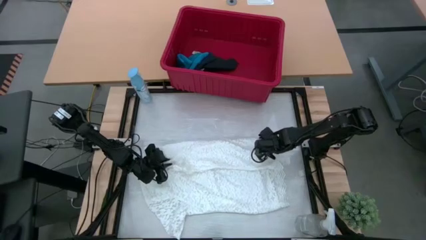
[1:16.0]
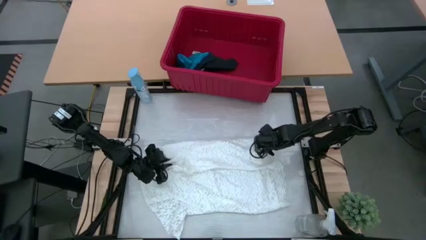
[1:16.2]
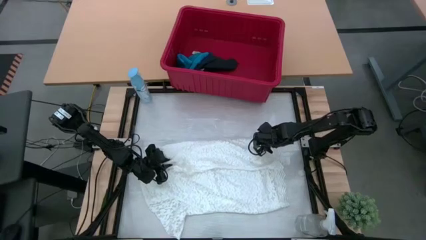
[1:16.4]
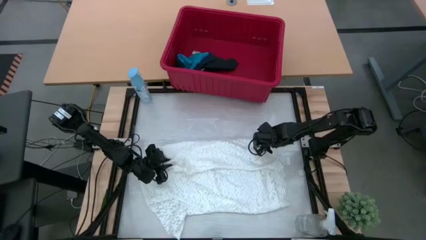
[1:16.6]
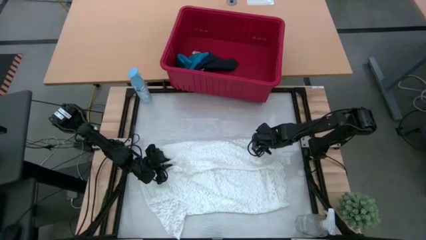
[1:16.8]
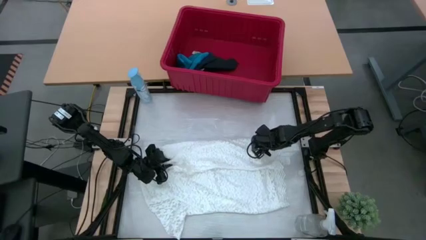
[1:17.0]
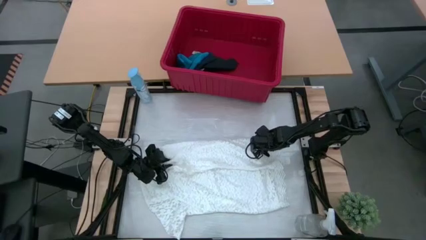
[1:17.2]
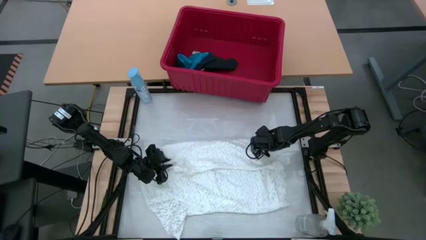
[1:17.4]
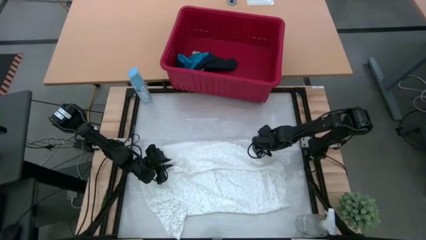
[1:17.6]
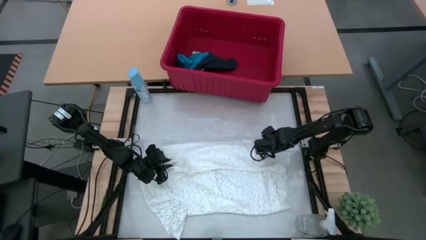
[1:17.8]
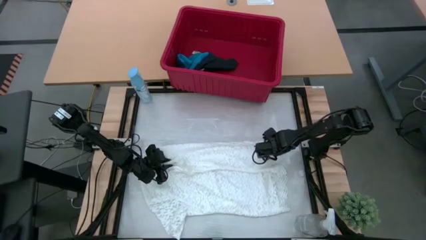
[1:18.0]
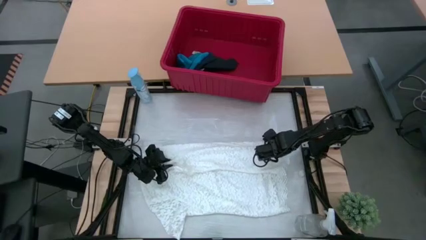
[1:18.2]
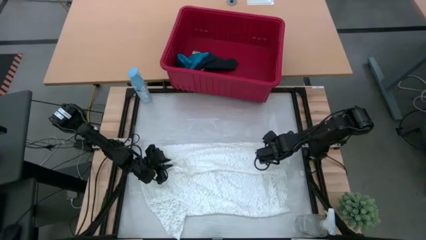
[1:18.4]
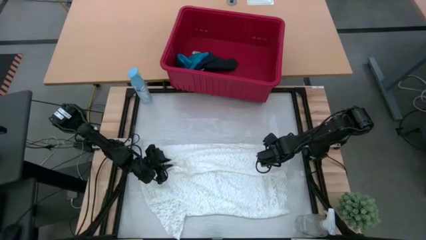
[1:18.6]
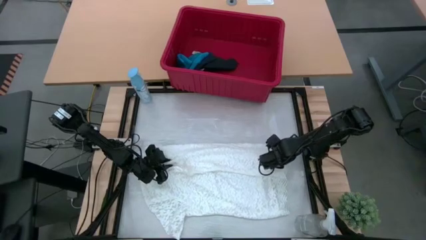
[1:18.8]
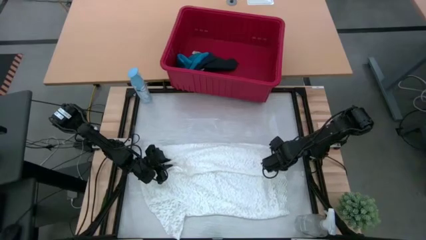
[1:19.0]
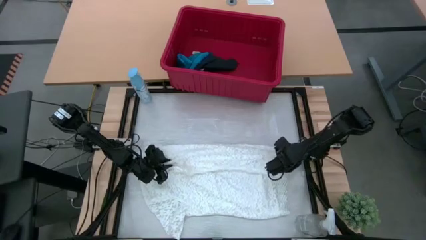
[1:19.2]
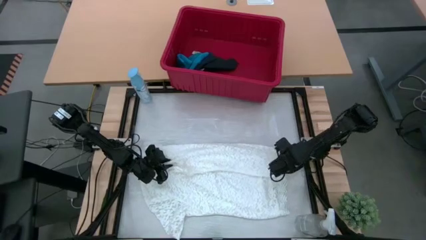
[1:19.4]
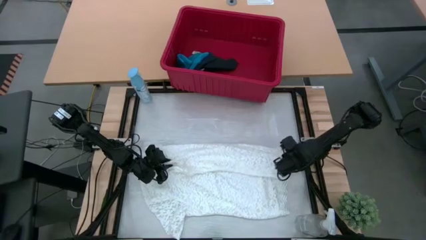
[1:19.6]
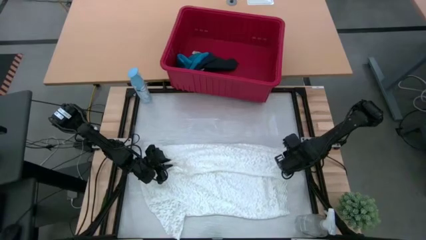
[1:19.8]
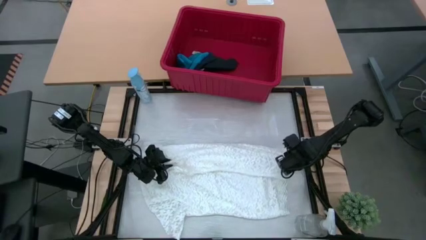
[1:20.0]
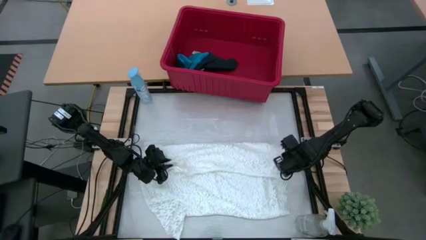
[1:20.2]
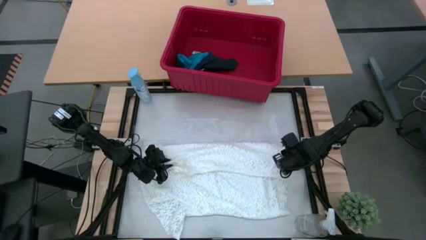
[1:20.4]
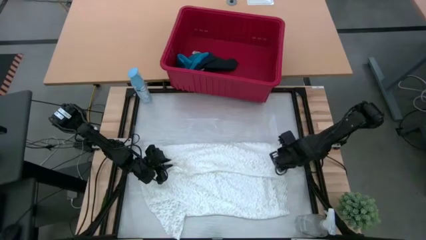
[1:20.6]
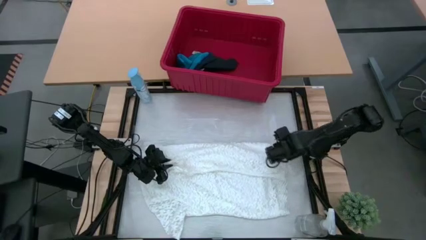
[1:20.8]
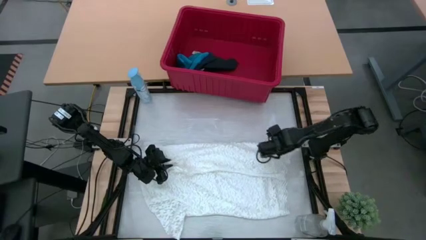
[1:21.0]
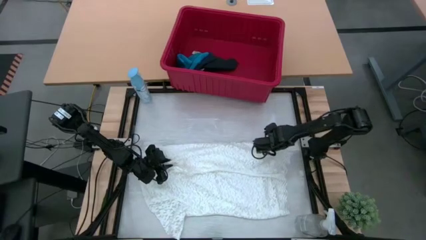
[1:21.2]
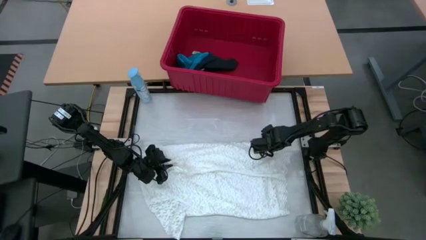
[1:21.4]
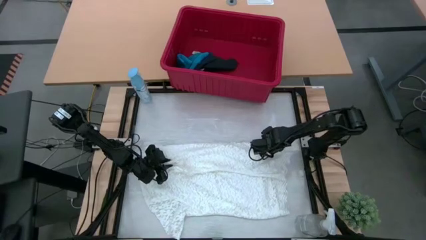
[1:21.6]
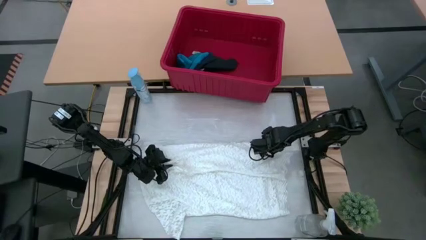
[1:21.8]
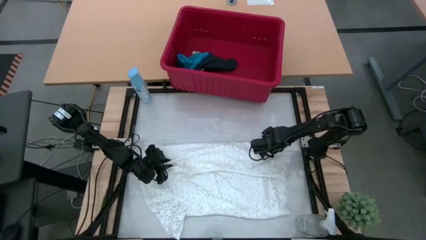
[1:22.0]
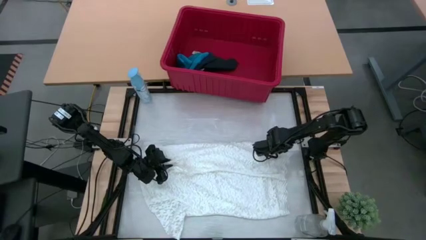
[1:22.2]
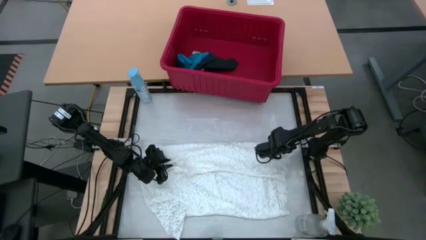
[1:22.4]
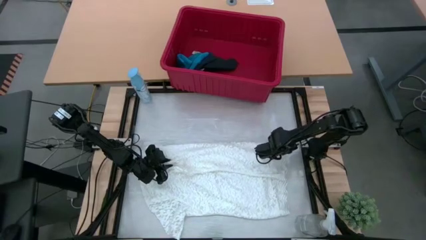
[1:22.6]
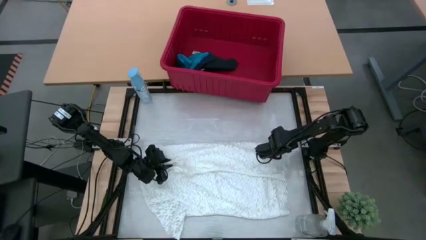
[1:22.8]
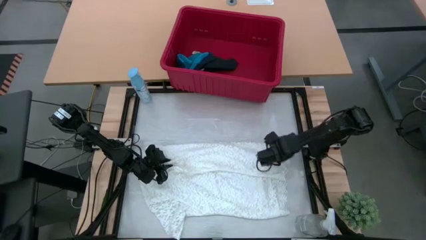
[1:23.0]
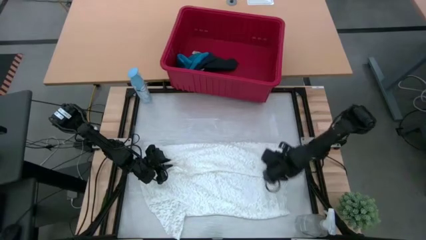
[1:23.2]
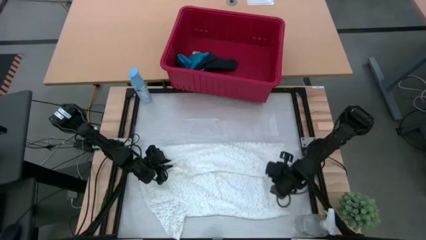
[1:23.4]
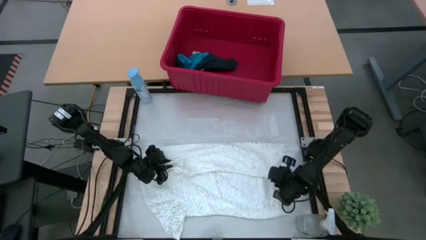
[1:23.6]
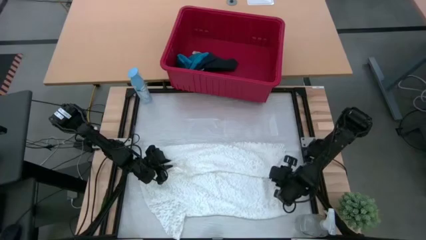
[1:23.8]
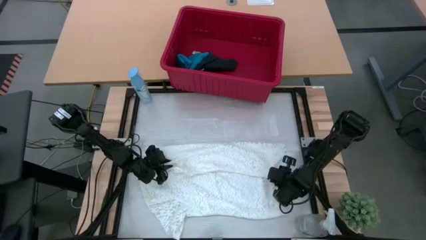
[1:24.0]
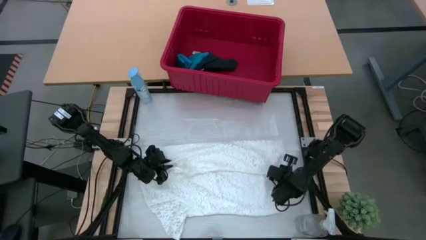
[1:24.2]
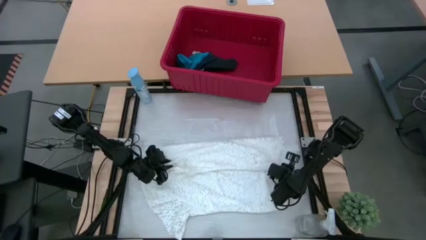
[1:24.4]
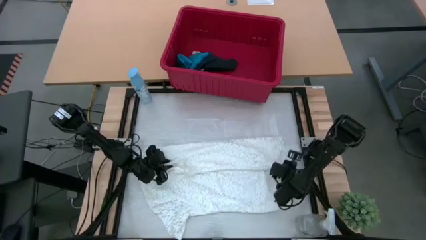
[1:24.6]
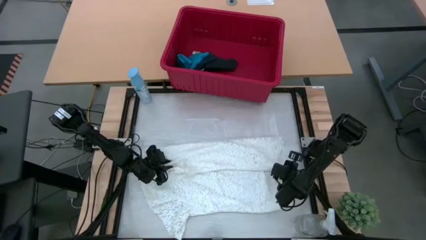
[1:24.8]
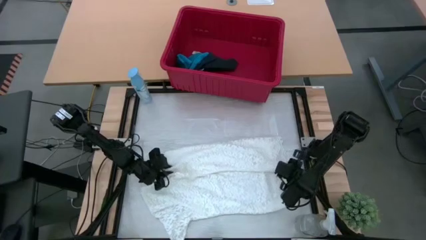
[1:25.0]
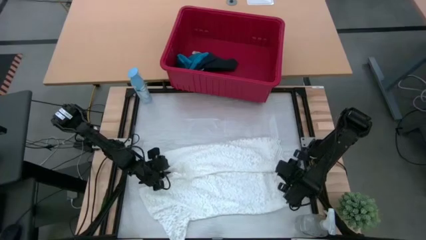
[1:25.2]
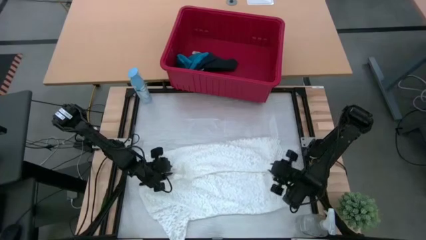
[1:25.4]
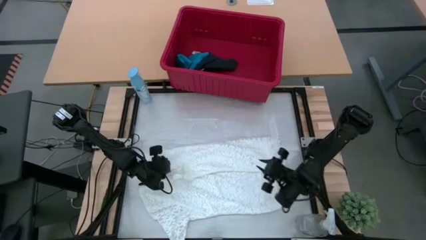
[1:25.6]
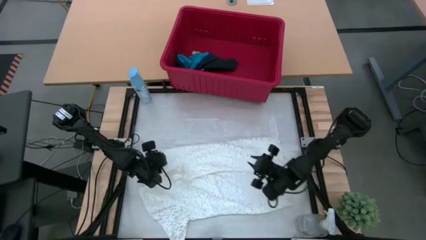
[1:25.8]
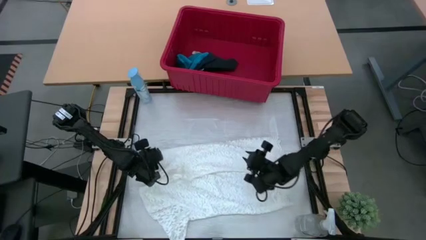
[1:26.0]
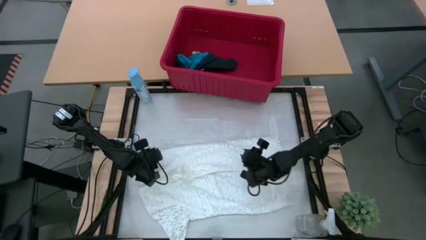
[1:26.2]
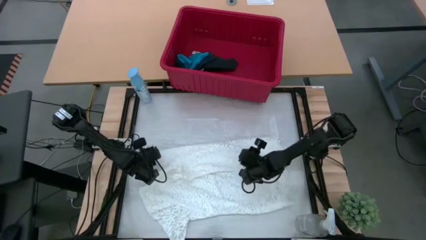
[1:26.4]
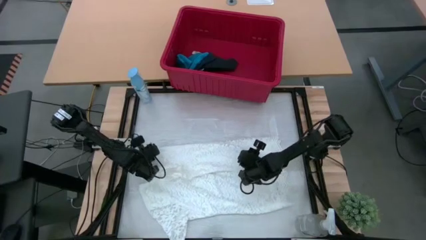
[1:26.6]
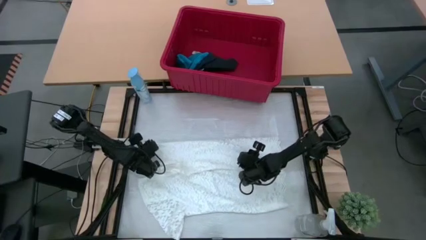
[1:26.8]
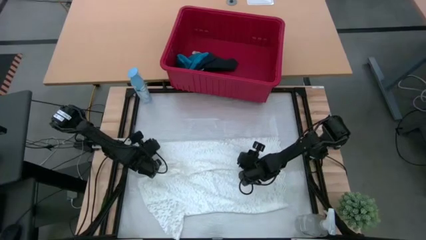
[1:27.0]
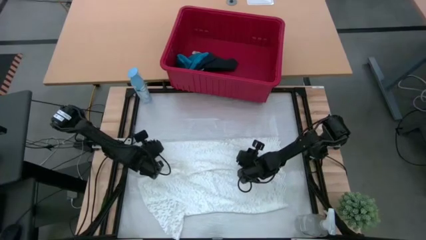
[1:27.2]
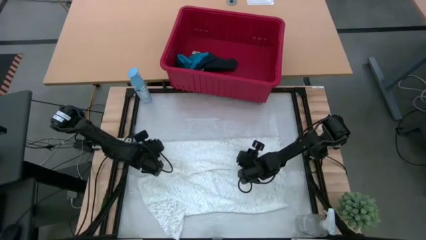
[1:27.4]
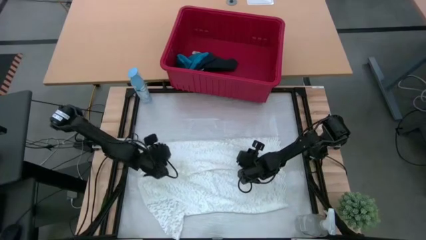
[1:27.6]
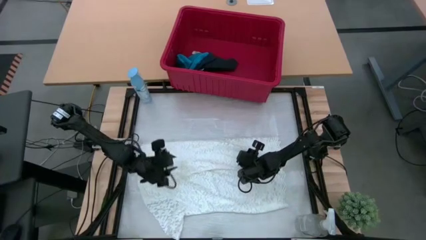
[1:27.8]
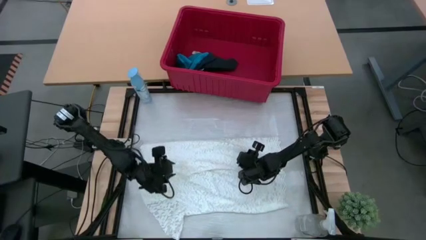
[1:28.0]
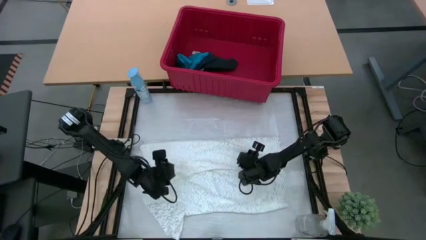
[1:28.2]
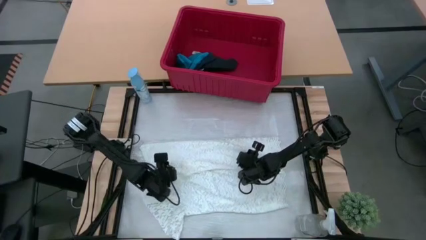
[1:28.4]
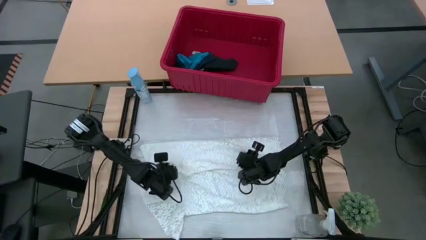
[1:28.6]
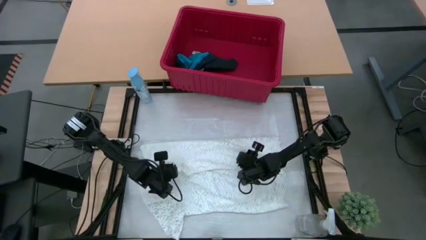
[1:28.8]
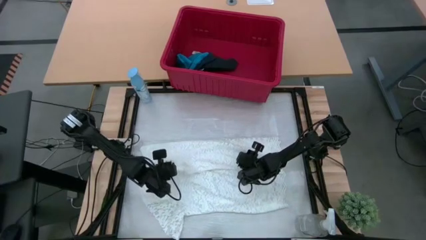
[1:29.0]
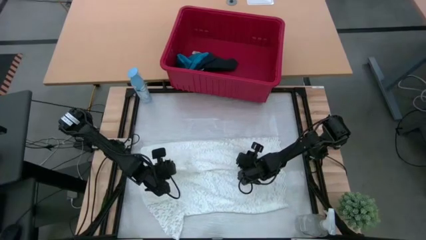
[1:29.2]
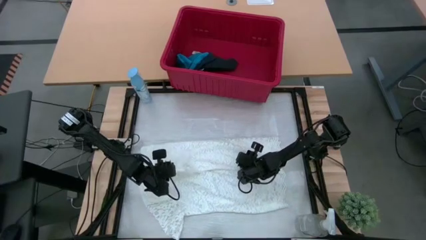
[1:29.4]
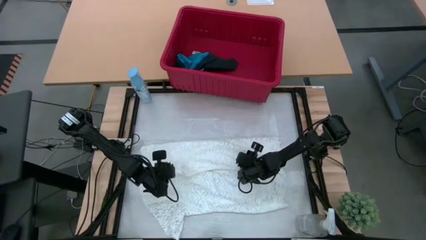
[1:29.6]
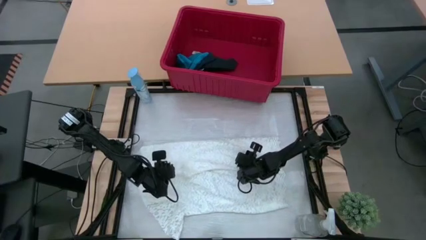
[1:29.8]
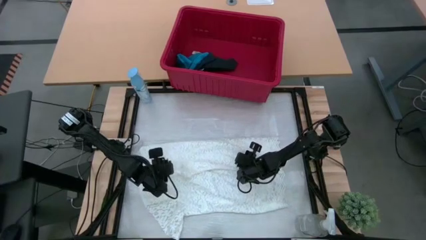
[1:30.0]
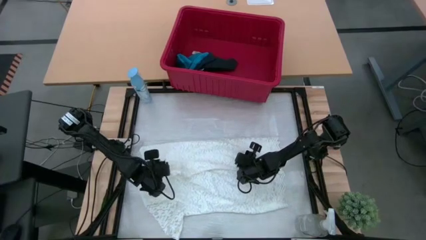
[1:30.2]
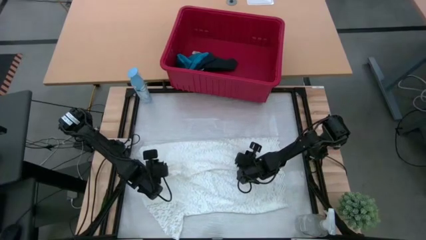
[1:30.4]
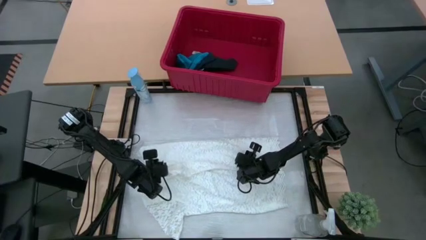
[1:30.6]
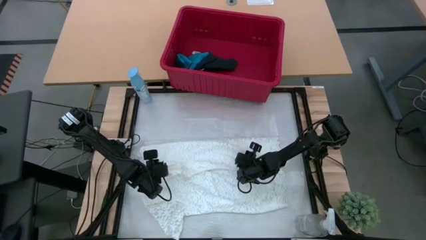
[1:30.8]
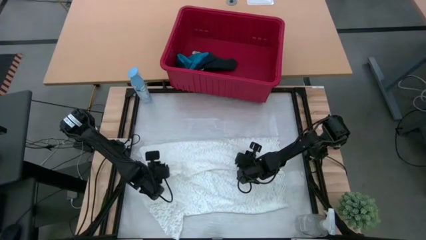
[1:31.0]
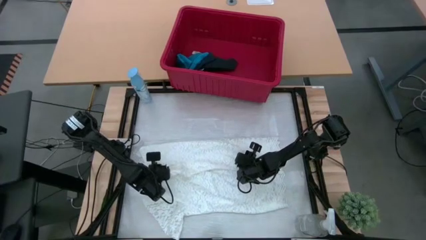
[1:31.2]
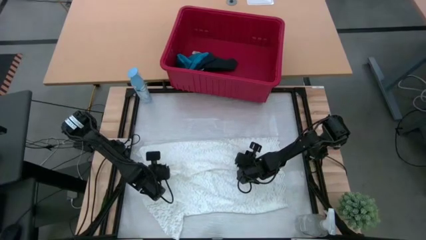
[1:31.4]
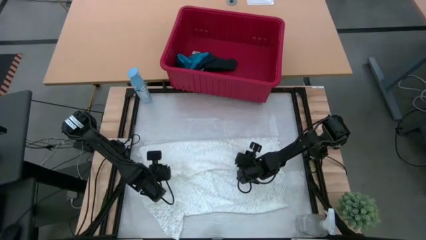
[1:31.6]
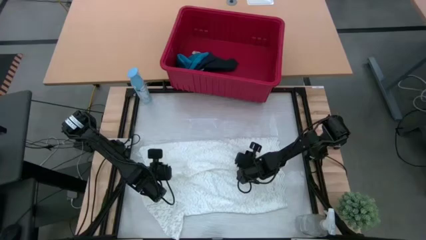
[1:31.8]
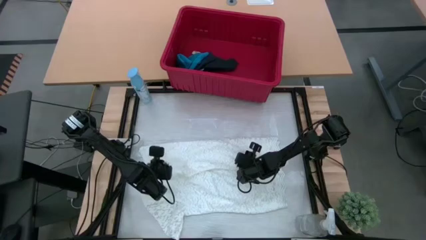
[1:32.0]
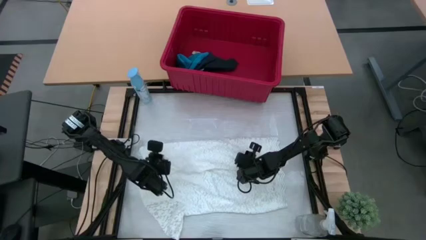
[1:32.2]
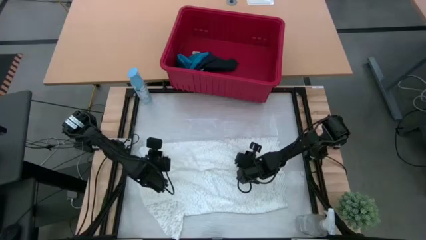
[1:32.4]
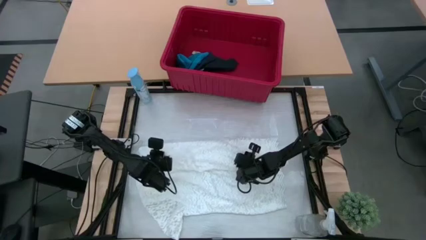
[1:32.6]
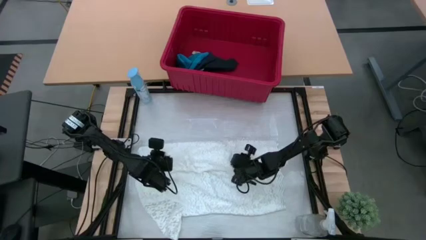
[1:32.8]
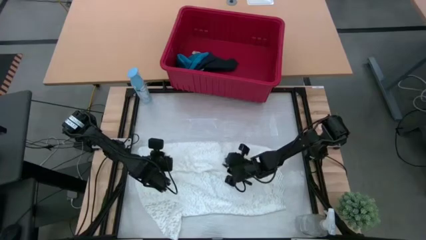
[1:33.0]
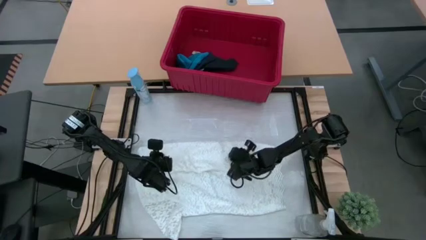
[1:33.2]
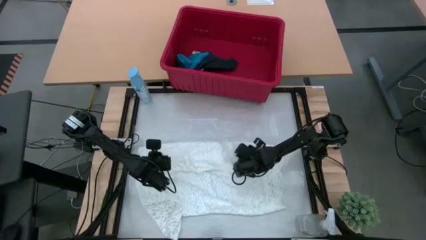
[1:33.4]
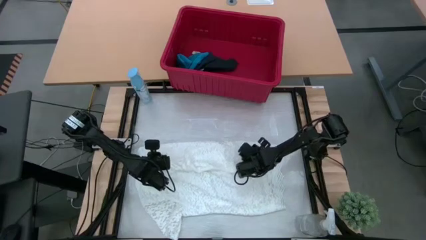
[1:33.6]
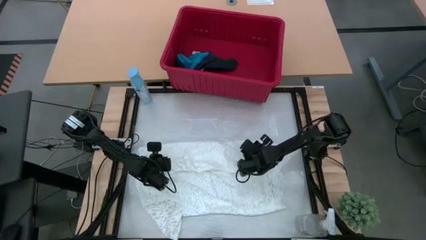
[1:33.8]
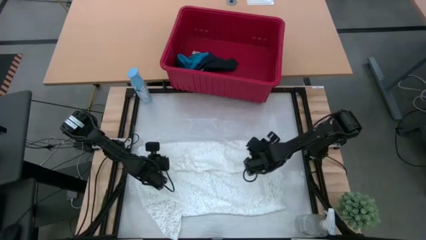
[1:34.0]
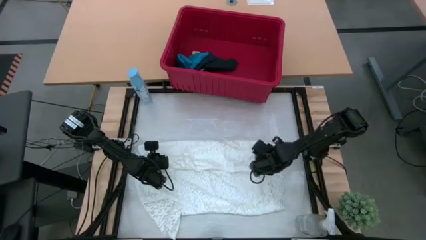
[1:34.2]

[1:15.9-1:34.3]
Task: Fold Laundry from Bin
Fold the white shirt
